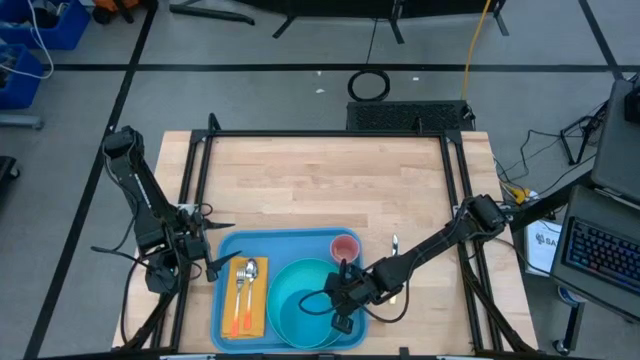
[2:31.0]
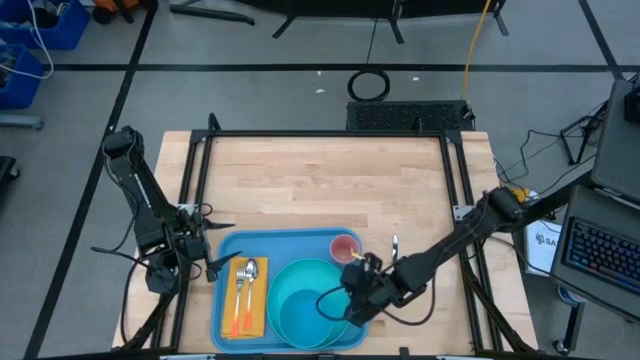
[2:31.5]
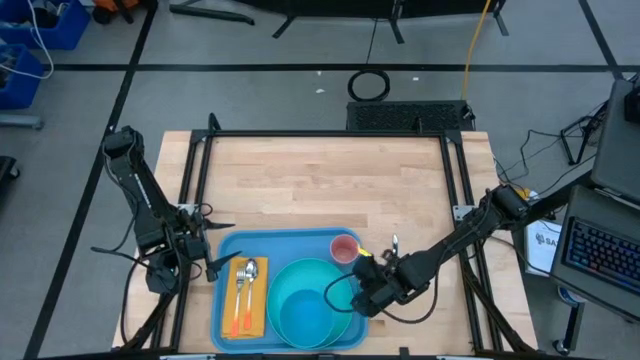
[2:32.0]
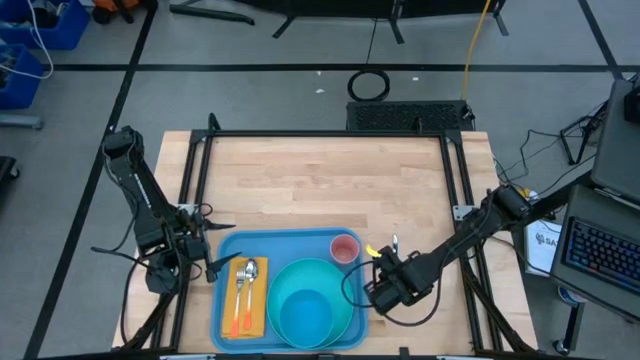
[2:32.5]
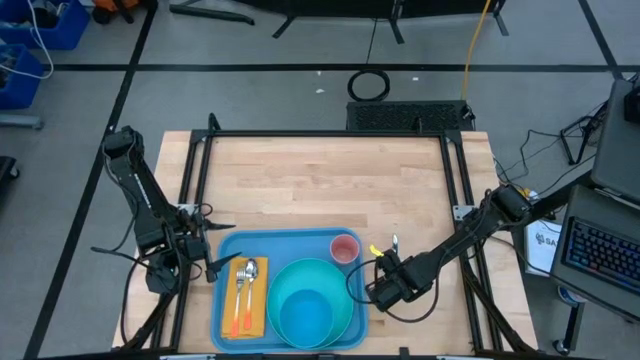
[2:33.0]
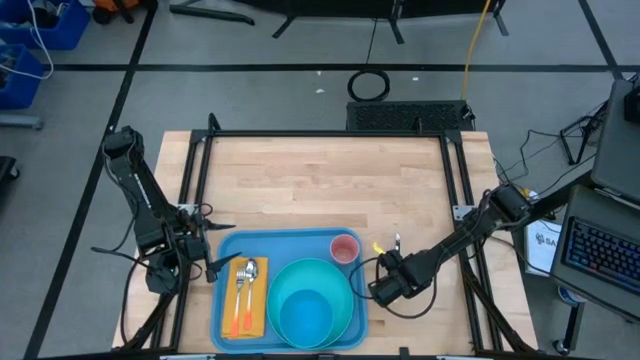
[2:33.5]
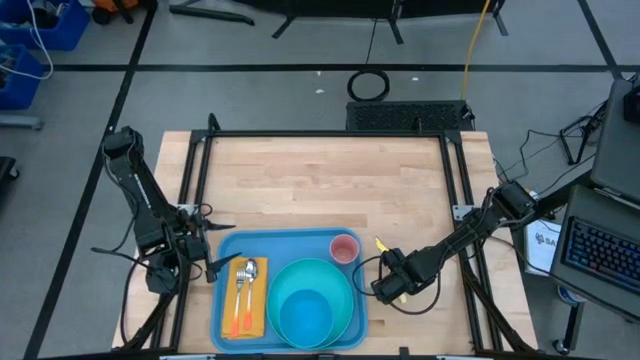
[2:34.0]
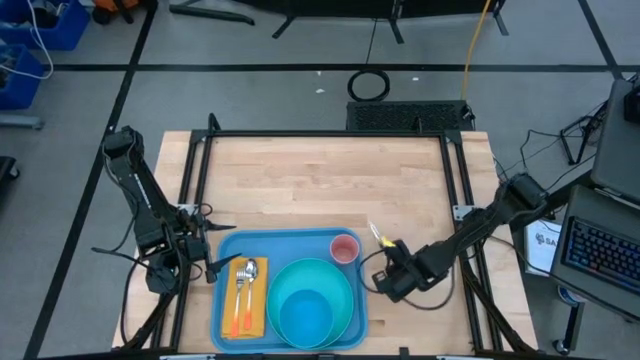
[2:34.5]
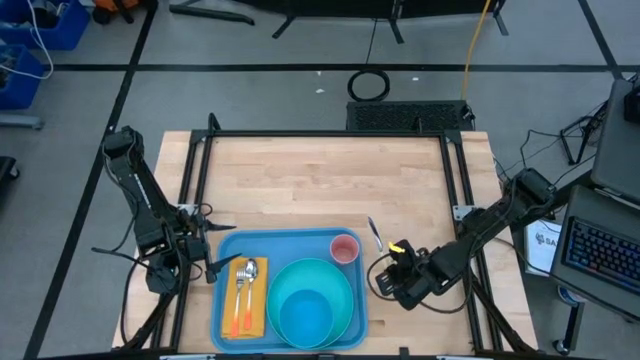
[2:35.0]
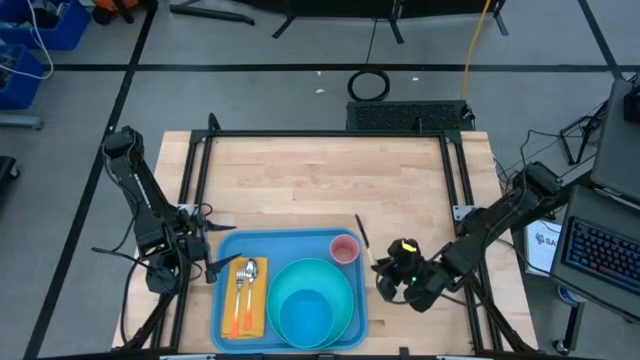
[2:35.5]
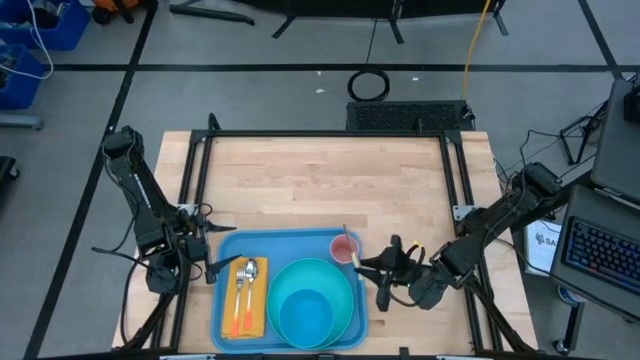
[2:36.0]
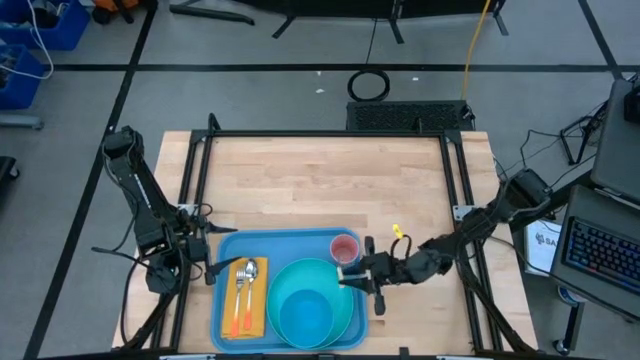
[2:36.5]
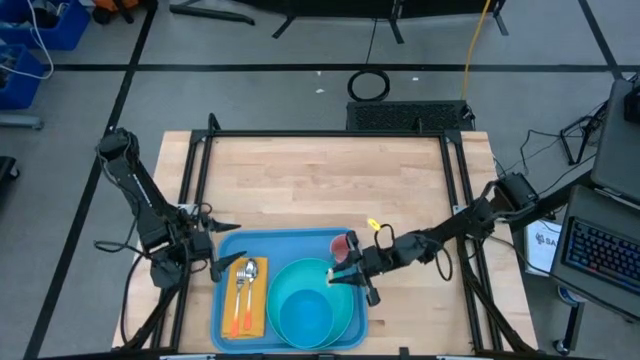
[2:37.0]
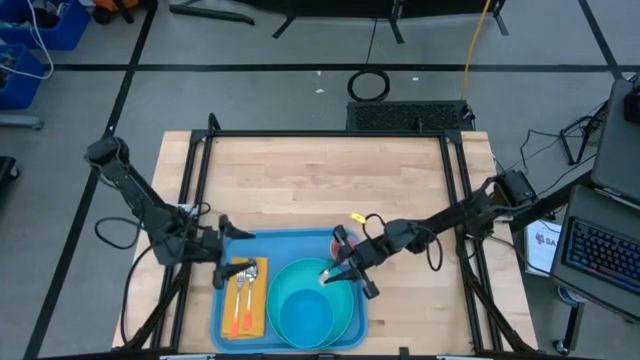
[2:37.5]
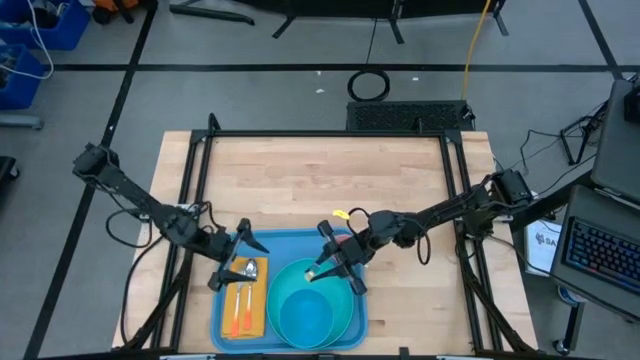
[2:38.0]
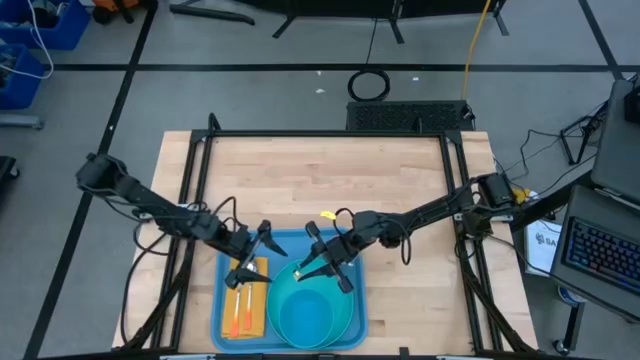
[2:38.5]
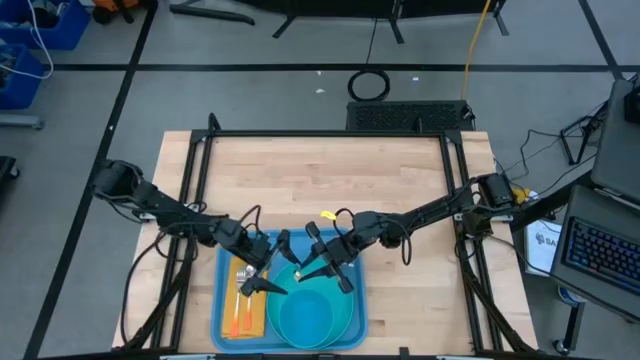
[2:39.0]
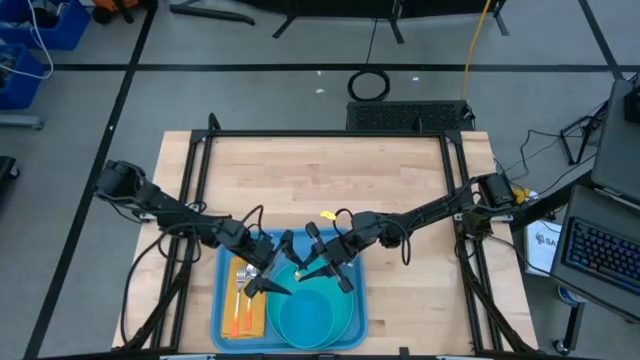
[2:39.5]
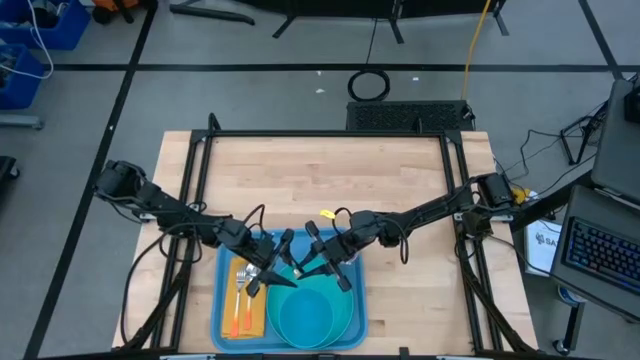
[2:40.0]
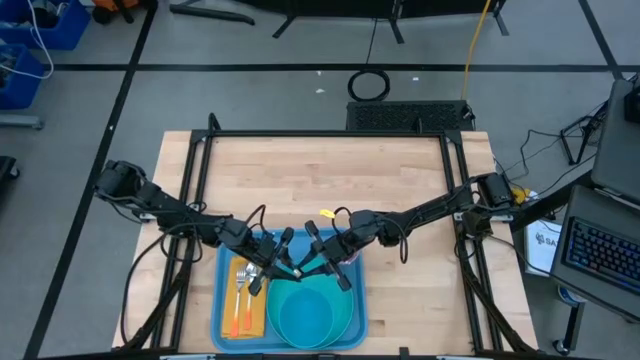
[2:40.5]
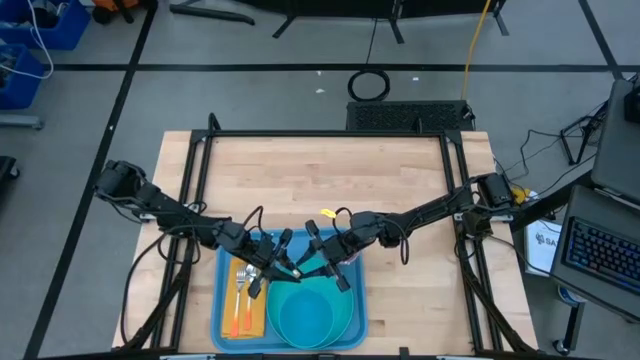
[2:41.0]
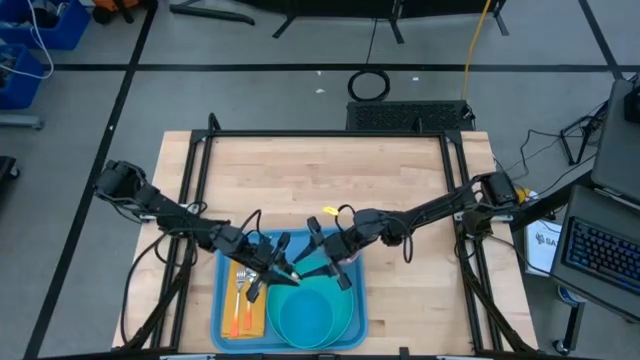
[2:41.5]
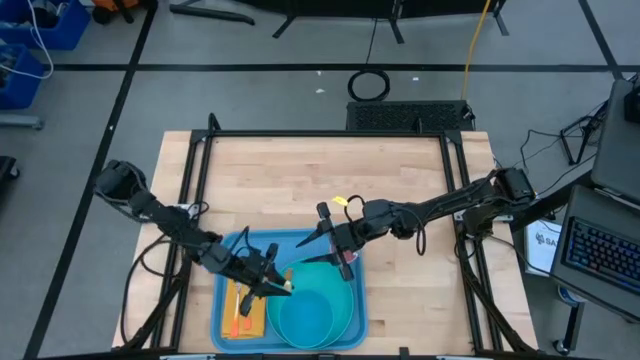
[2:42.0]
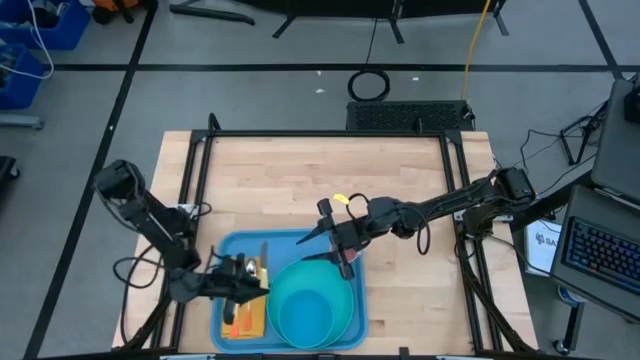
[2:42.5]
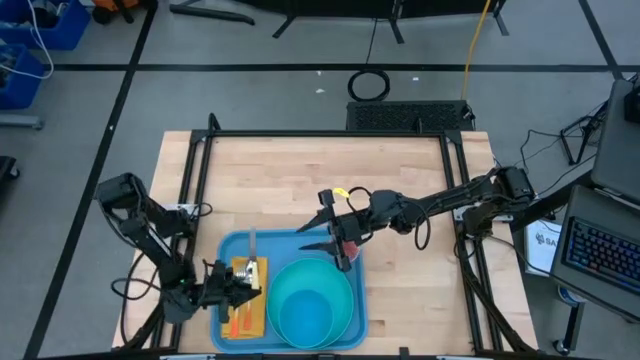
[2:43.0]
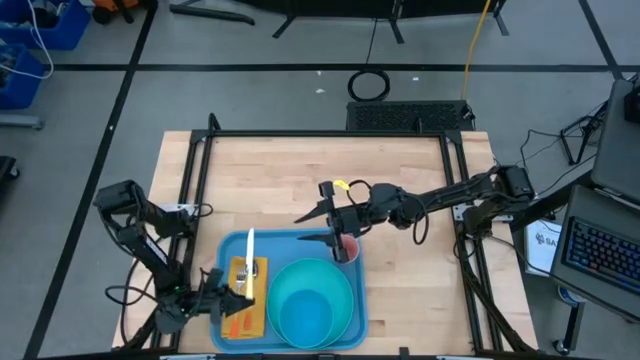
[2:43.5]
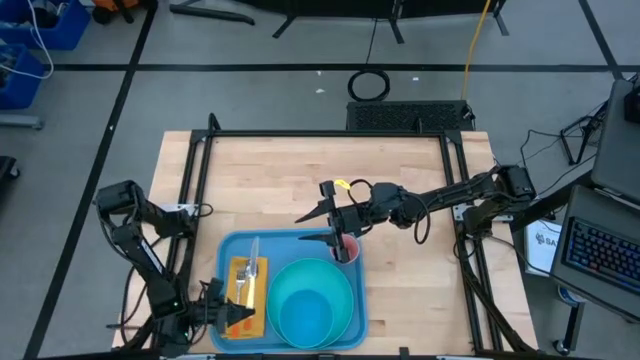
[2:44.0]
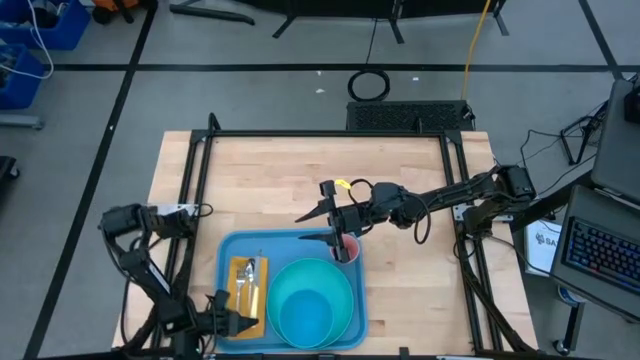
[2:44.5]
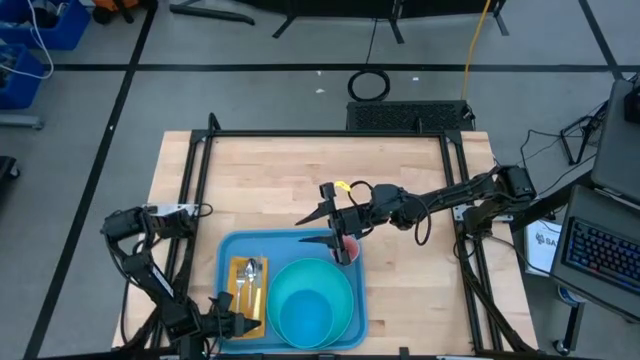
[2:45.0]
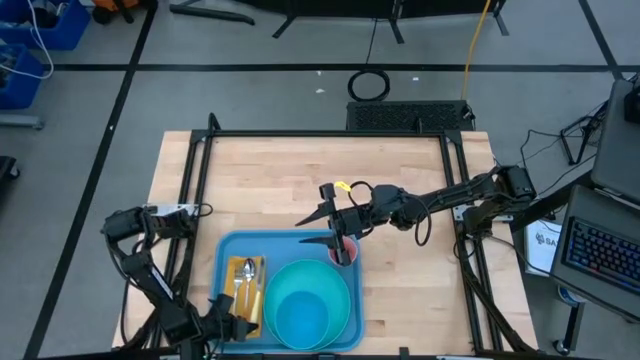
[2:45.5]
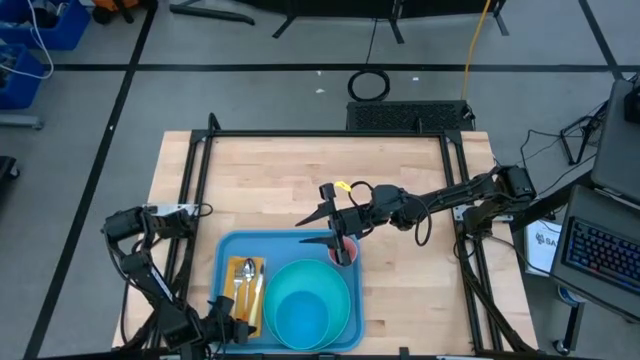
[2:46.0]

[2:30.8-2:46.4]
Task: Set up tray
Put the light yellow table knife to the right of the orange spoon on the yellow table napkin
